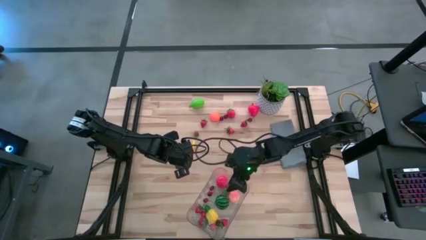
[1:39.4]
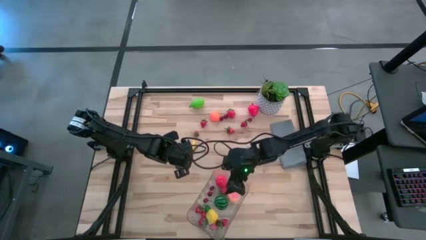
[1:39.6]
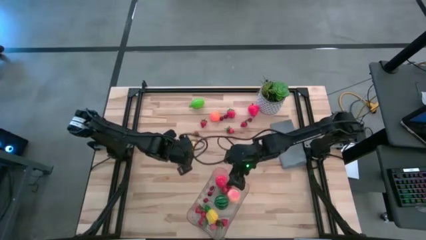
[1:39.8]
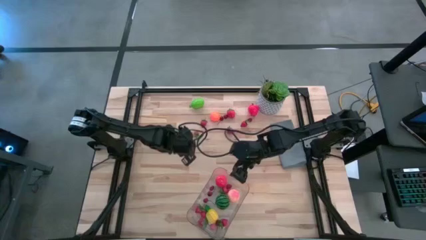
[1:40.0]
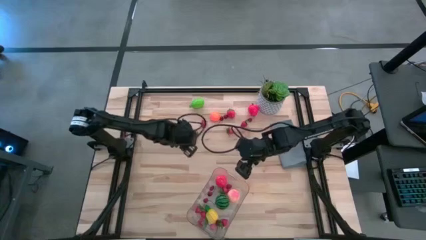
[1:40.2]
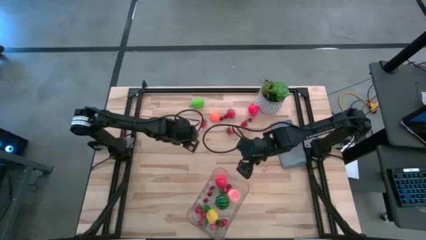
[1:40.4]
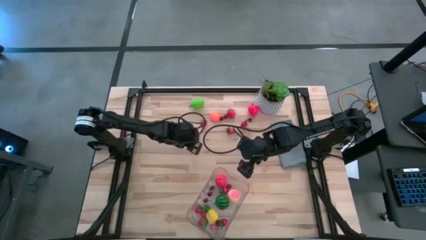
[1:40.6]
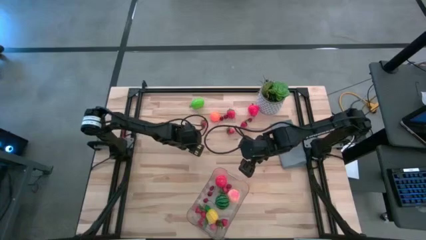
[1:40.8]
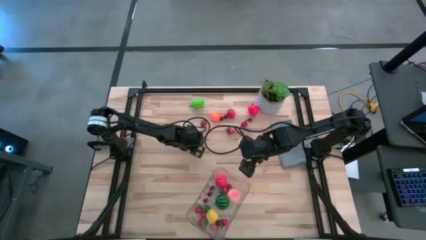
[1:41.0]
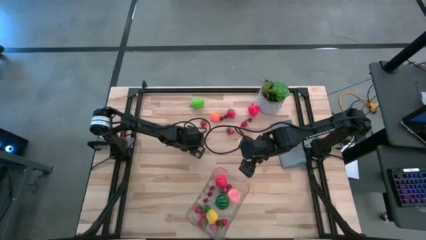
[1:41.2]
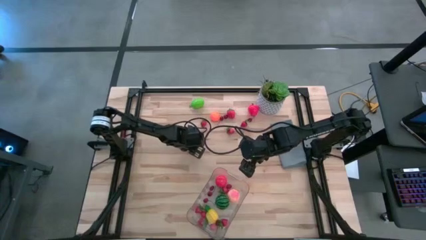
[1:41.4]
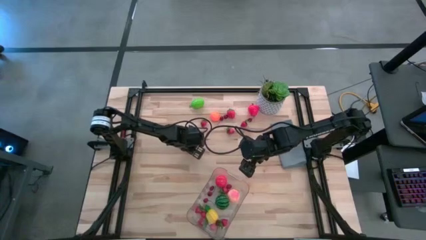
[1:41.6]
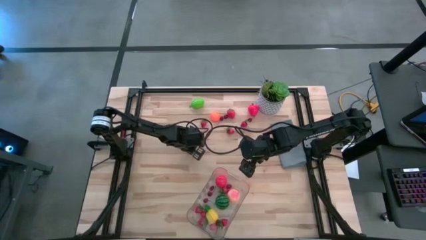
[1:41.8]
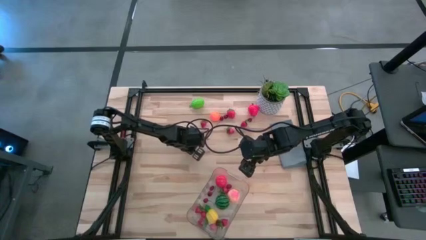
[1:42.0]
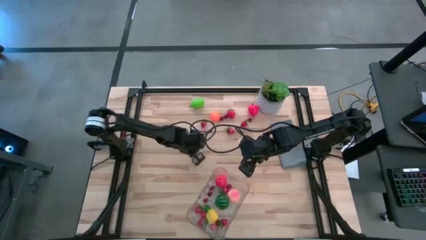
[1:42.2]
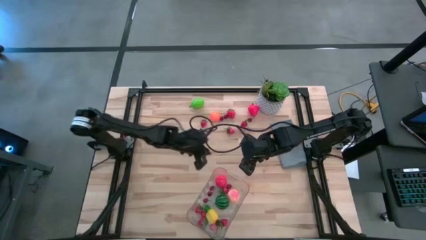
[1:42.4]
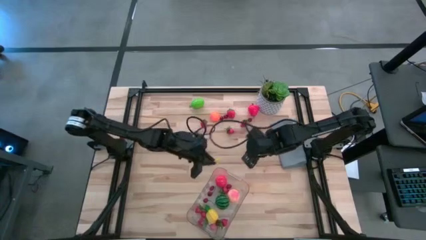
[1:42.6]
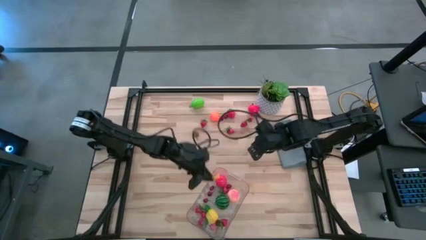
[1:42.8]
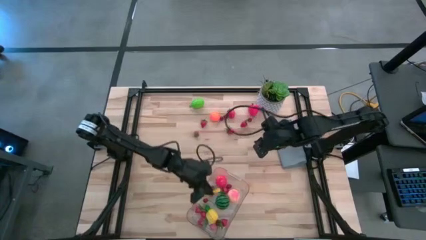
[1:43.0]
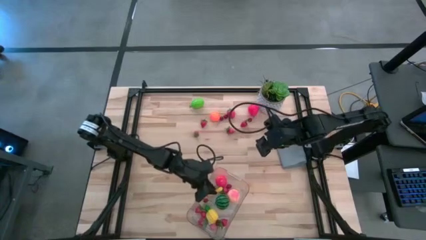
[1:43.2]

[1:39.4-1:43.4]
Task: Pick and placing Produce into tupperware
Put the yellow corn into the transparent basket

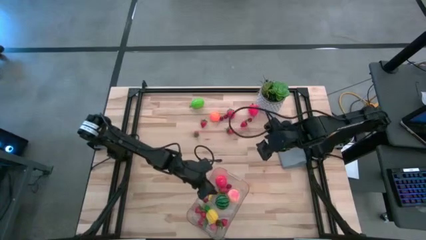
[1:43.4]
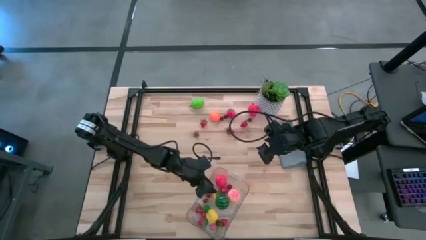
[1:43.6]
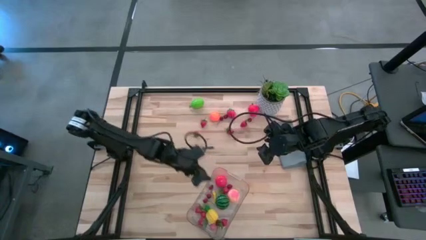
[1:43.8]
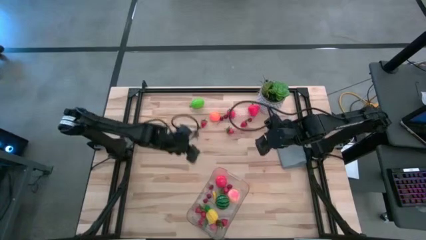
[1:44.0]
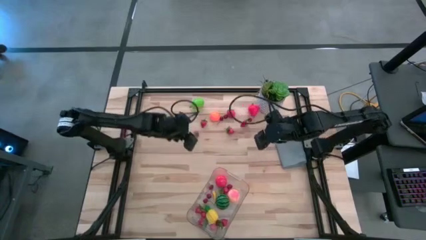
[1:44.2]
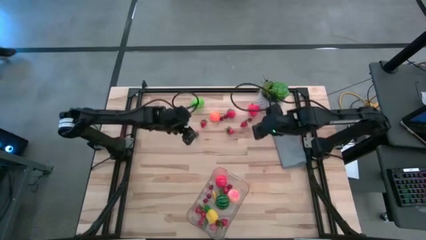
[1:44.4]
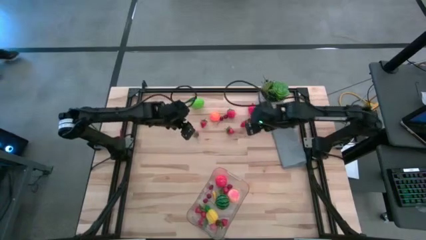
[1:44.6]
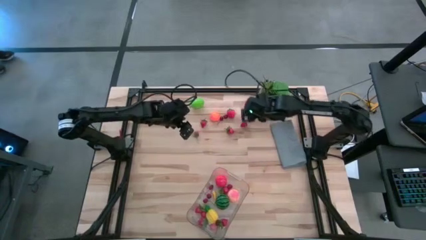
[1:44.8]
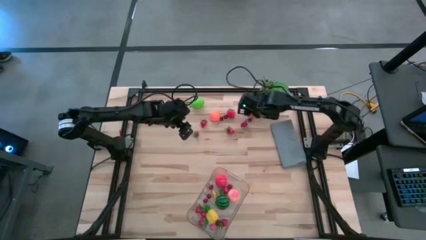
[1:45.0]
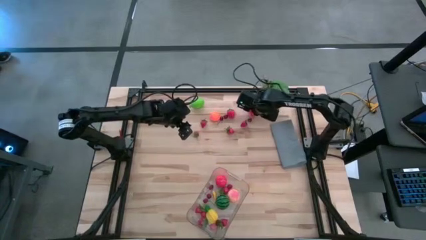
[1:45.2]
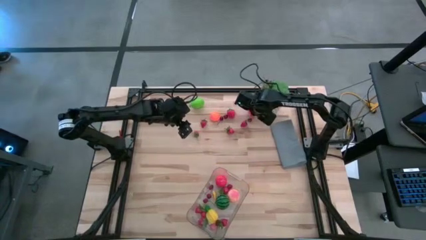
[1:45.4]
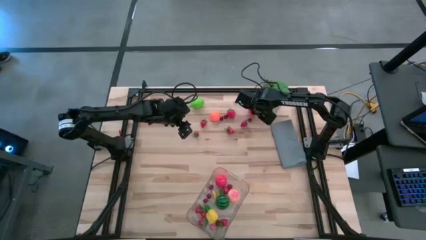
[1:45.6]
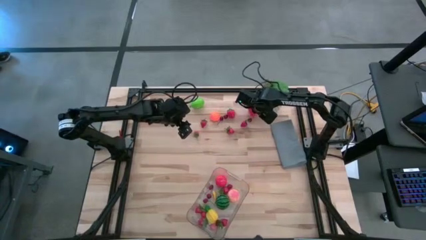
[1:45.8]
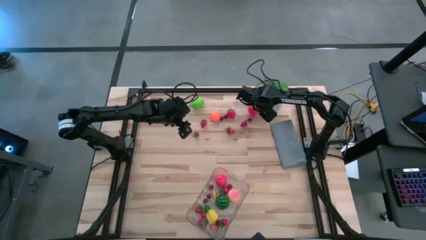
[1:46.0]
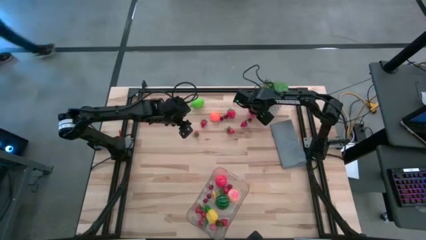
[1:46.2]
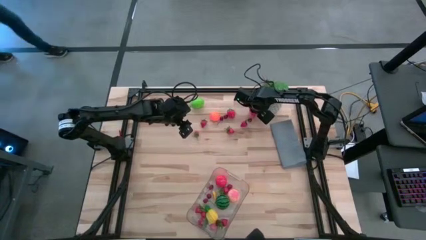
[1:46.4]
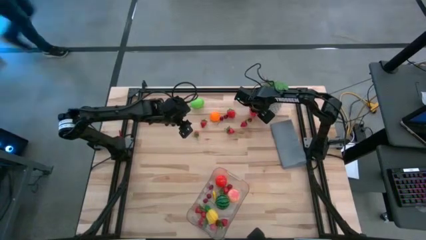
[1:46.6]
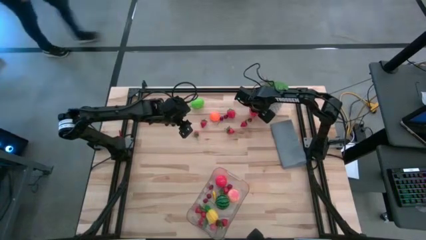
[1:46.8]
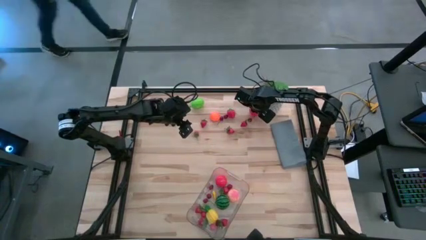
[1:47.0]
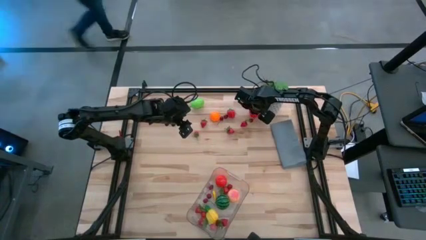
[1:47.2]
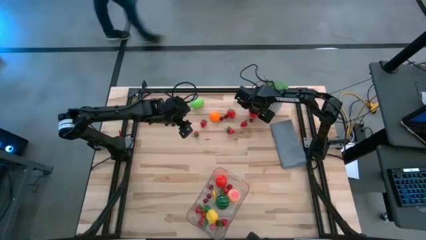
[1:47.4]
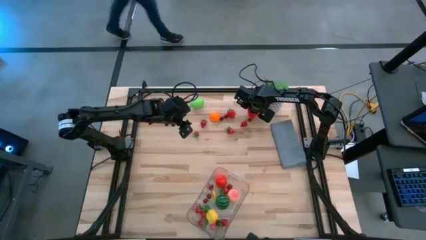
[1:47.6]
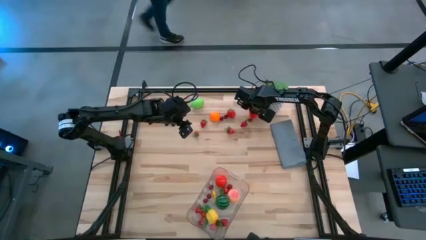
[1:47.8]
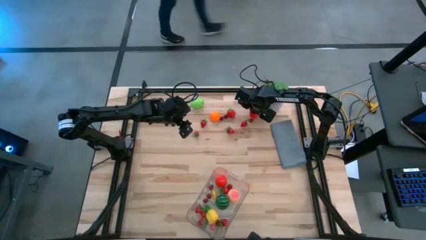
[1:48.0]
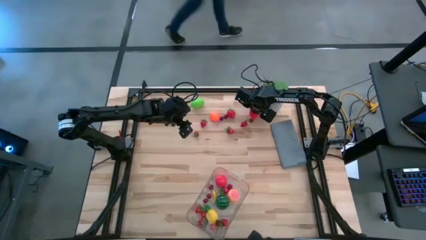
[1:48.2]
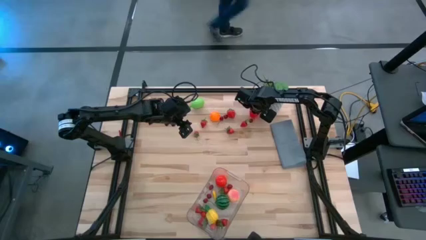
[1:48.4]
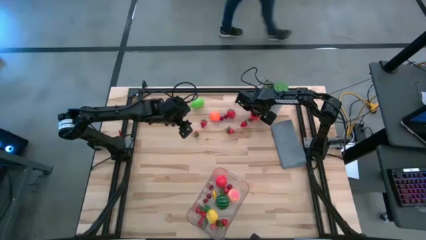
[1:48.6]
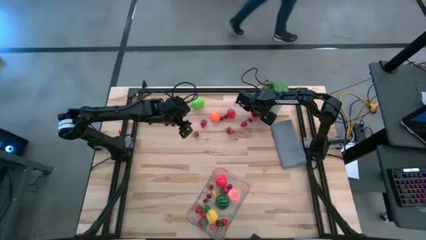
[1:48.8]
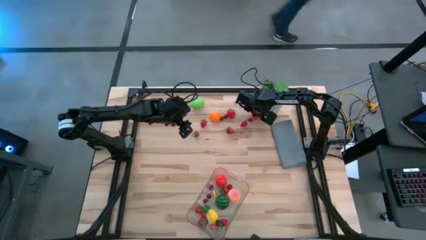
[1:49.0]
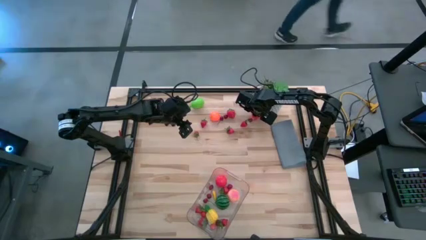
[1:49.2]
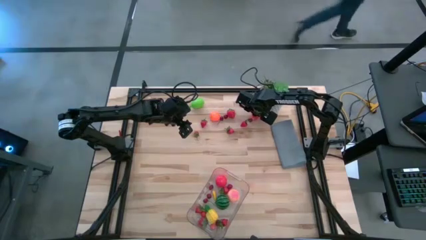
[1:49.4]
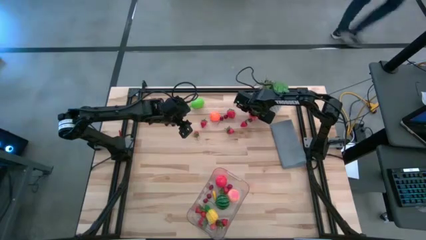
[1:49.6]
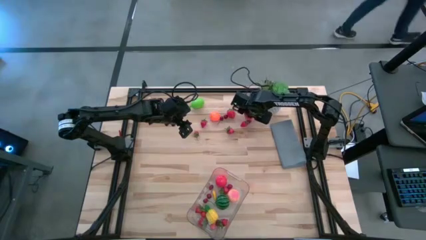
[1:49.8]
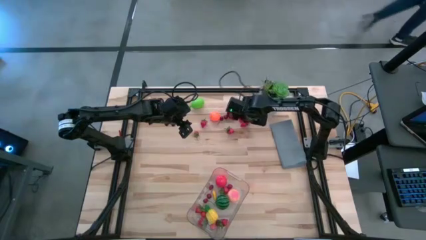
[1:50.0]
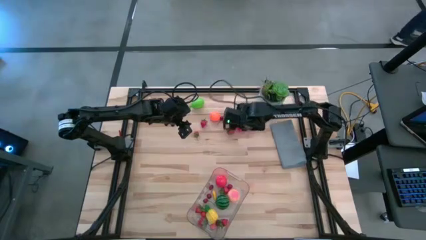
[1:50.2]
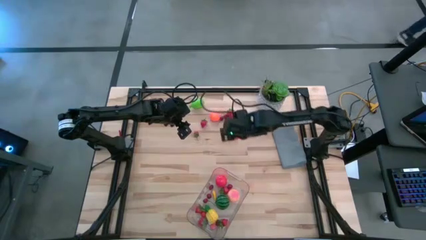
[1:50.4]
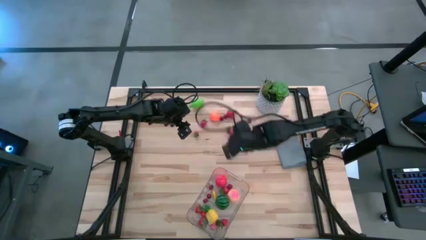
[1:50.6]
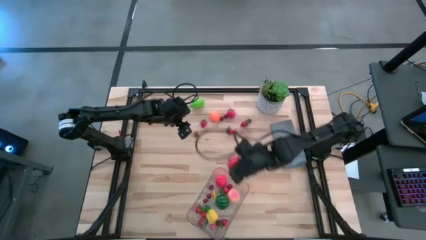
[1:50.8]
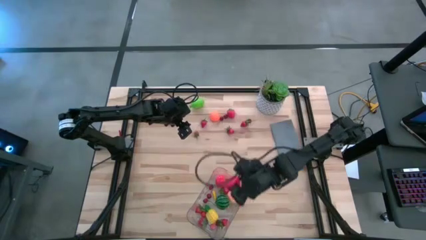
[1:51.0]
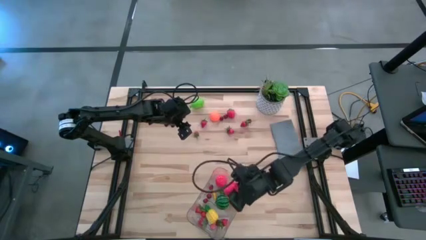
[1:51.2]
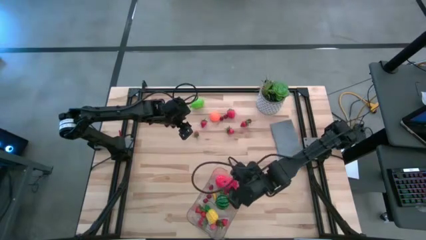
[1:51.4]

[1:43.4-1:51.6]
Put the red apple into the transparent basket

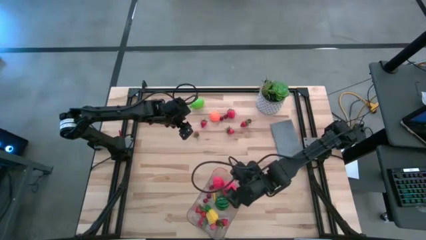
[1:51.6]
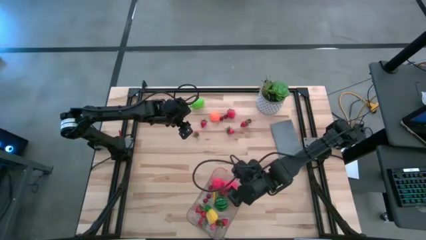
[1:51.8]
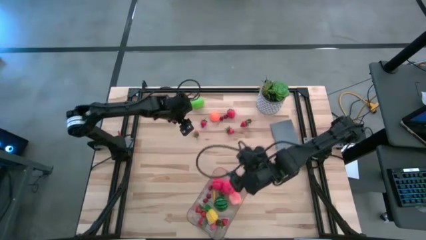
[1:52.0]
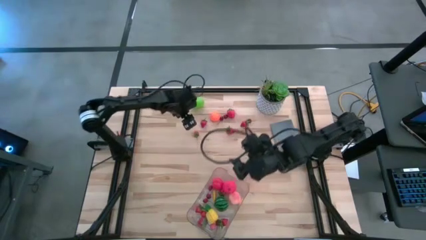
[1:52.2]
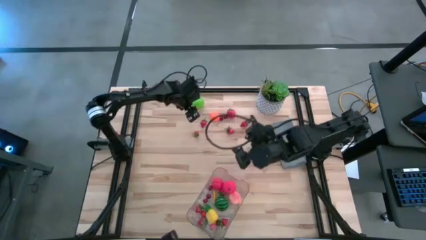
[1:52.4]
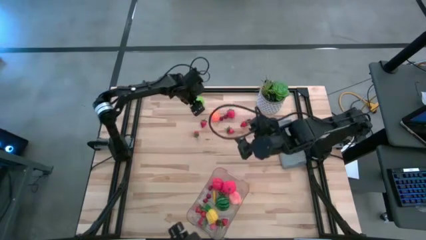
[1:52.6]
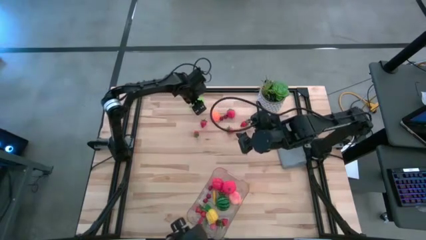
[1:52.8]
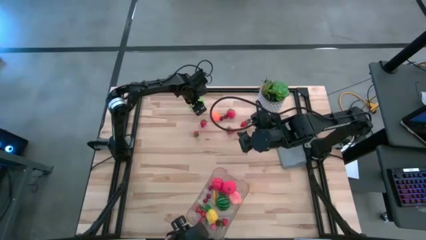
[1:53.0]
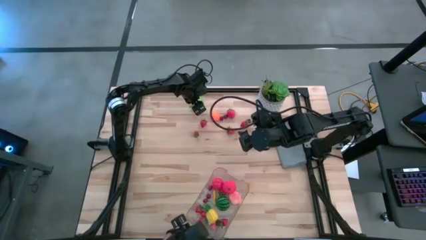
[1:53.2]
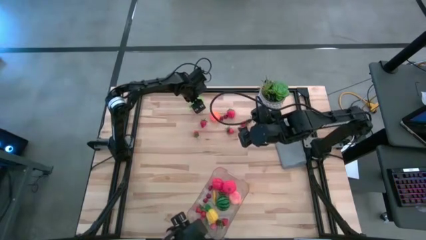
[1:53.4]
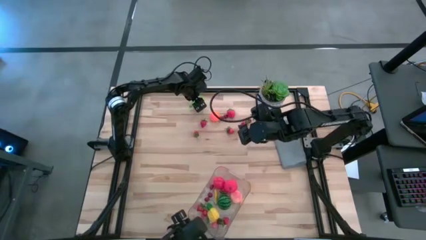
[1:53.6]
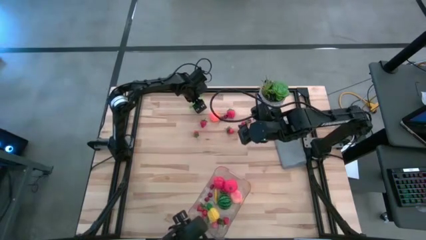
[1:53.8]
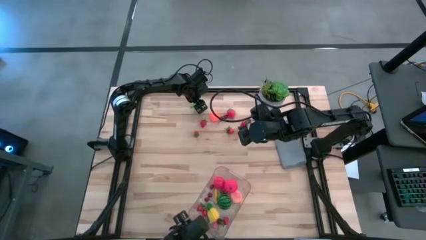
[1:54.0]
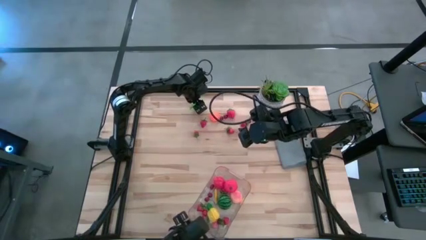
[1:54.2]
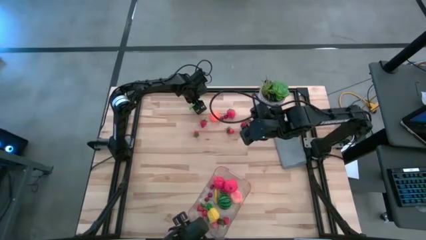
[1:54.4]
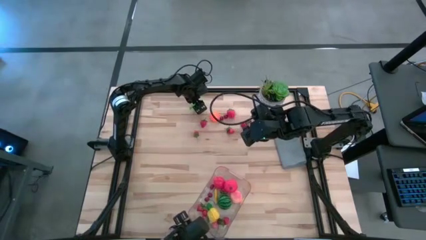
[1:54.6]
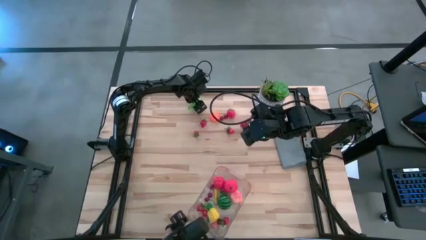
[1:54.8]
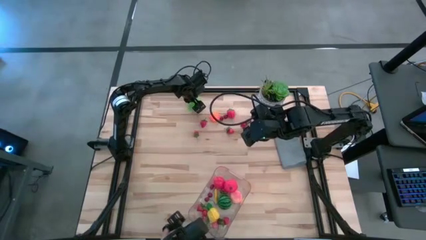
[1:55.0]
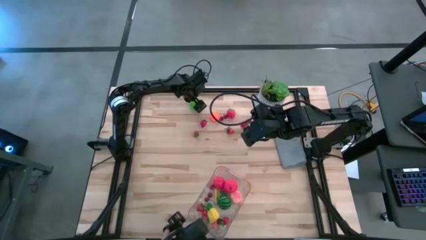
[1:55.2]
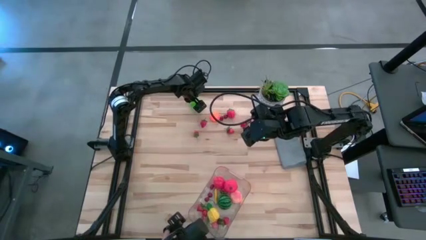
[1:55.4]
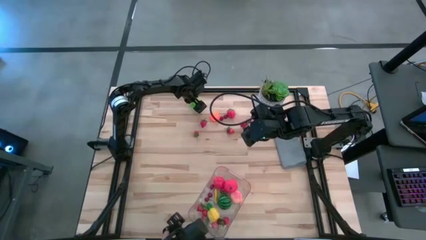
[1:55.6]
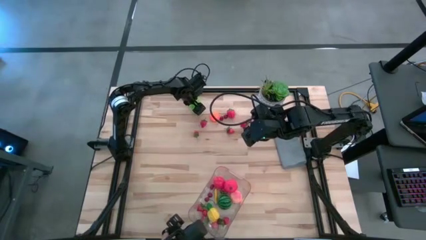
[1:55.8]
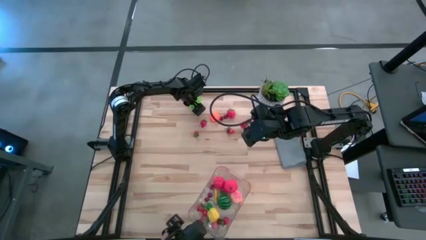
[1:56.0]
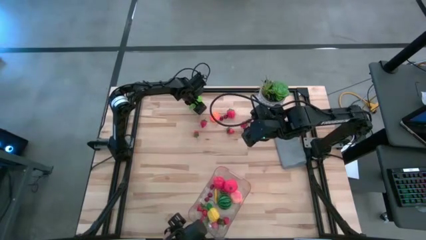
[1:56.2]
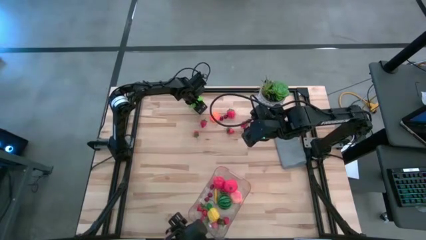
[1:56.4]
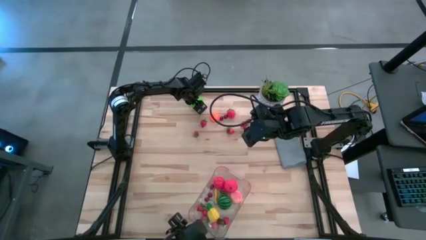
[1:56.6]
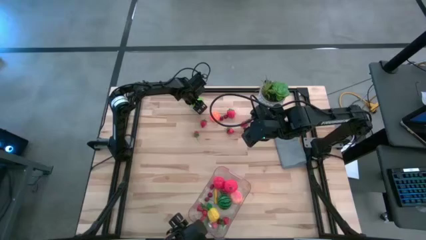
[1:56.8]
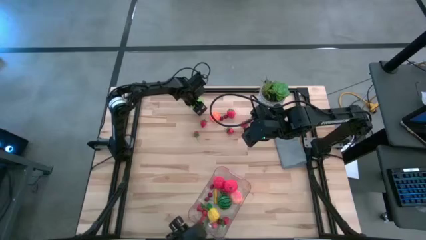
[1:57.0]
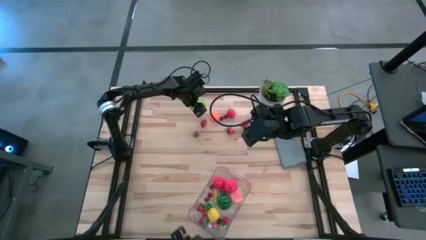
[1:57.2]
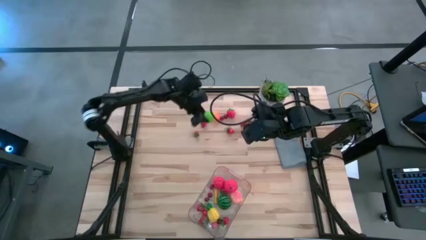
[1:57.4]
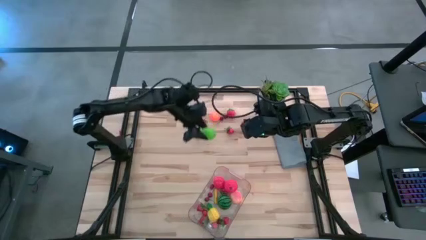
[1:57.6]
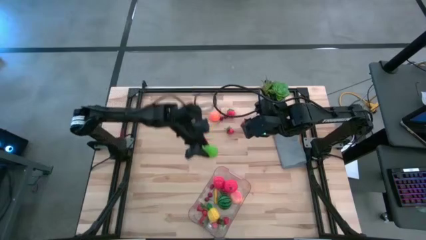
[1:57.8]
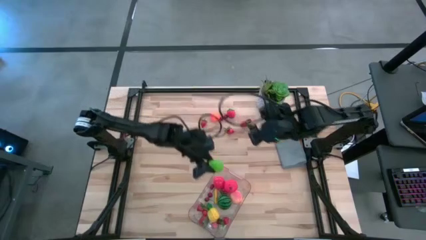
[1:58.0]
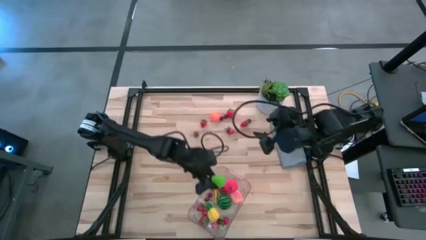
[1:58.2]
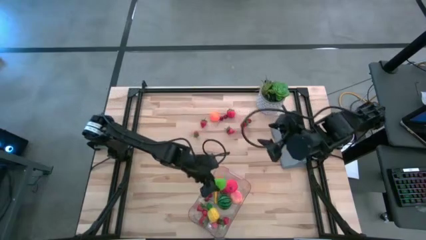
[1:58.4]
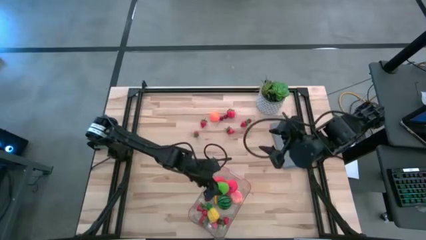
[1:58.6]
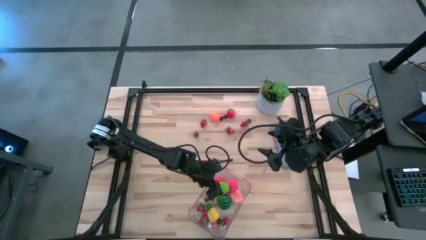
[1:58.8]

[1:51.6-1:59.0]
Put the green melon into the transparent basket
